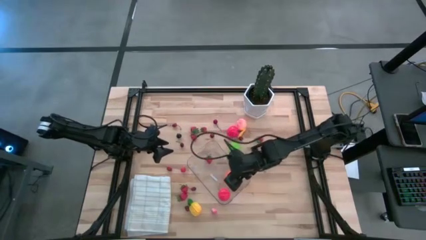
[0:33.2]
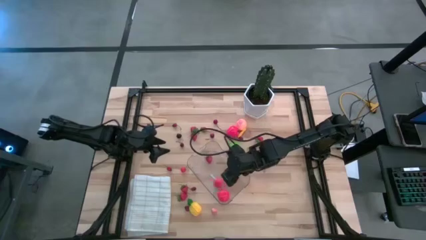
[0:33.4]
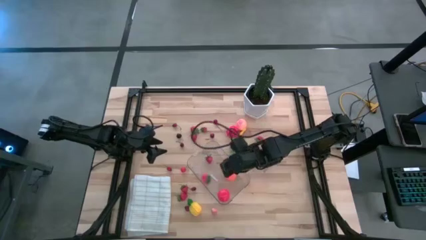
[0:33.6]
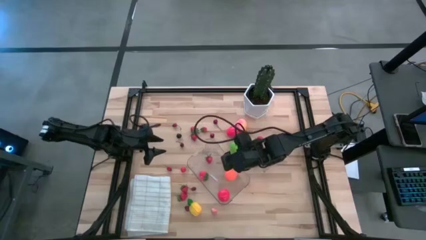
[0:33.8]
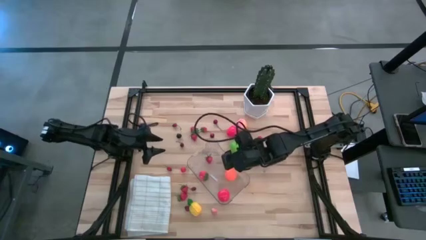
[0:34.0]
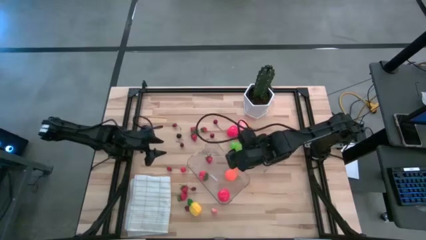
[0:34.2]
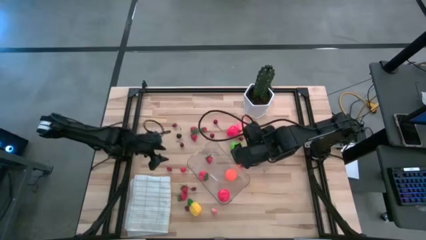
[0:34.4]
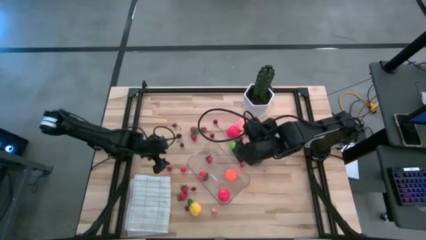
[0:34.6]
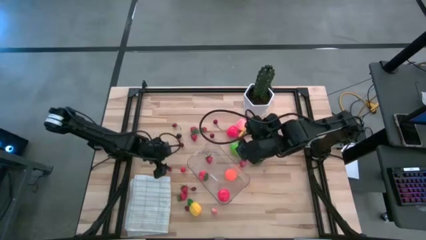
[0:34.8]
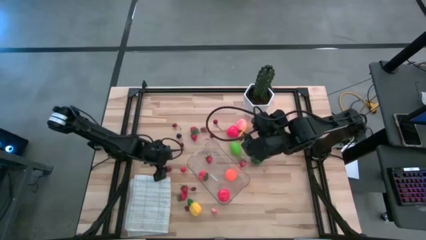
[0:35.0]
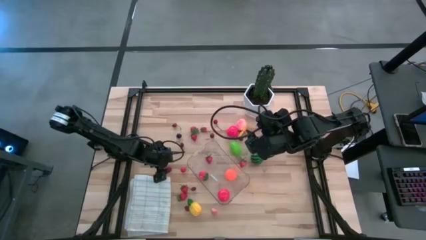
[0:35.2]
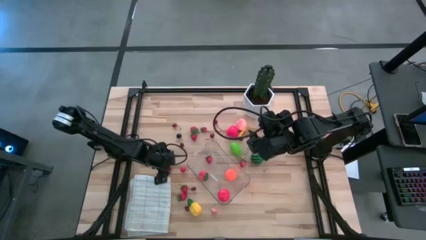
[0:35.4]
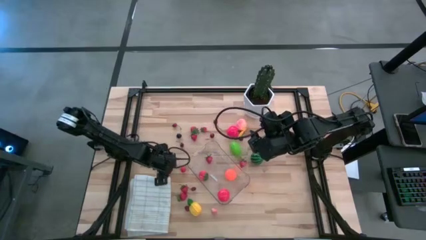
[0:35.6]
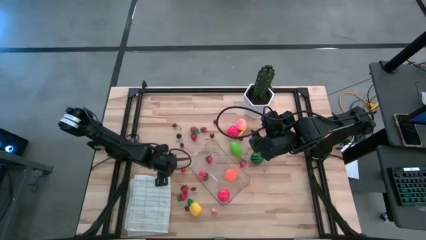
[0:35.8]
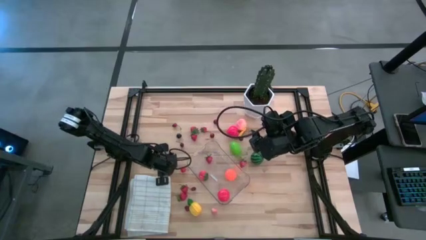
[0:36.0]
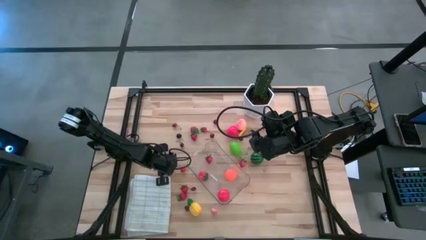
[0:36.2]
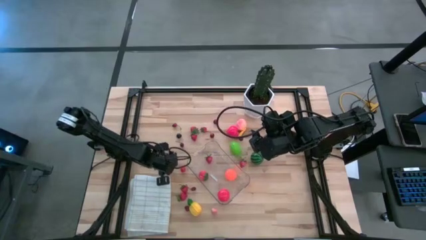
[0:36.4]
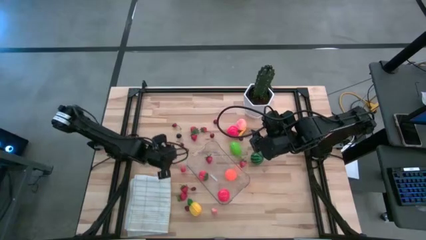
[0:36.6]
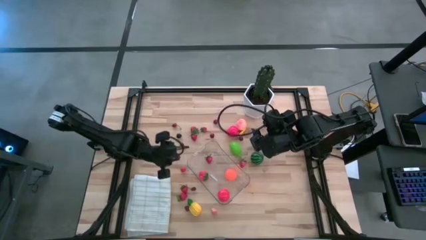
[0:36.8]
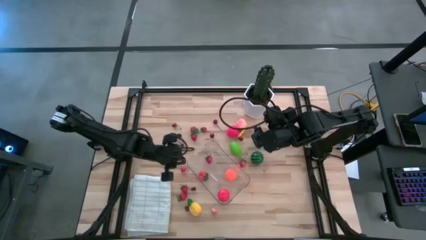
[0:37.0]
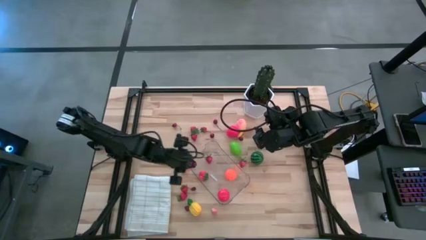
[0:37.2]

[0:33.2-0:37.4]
Task: Pick and placing Produce into tupperware
Put the red cherry into the transparent bin

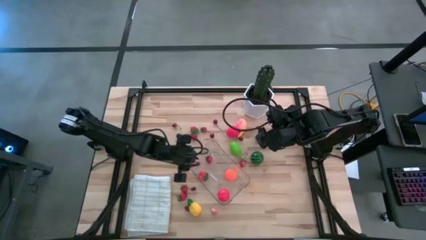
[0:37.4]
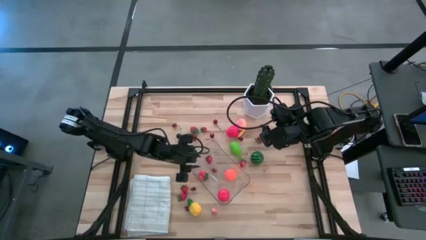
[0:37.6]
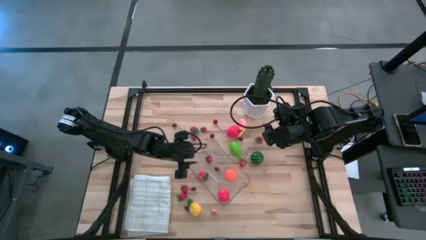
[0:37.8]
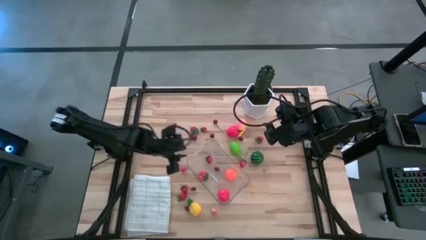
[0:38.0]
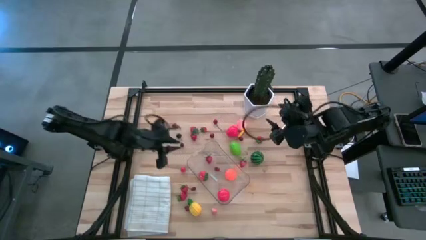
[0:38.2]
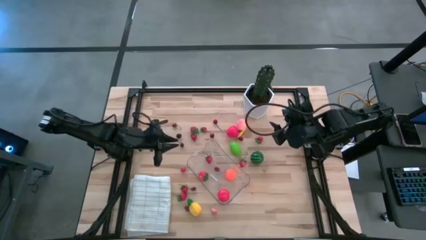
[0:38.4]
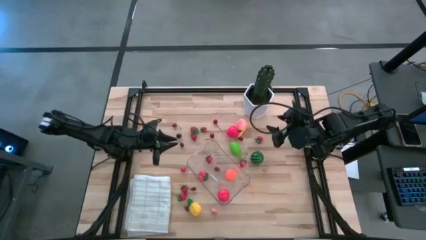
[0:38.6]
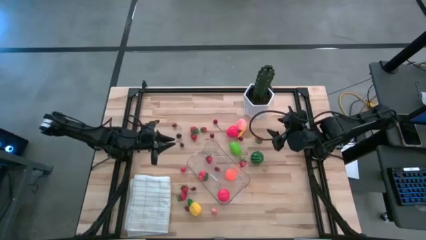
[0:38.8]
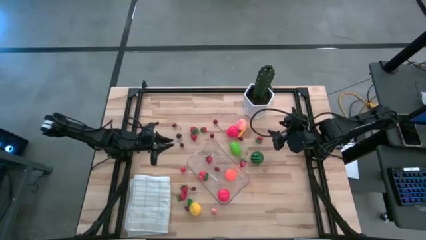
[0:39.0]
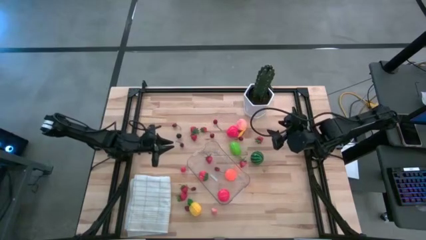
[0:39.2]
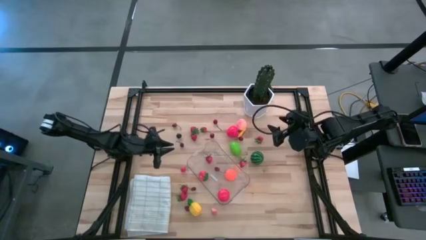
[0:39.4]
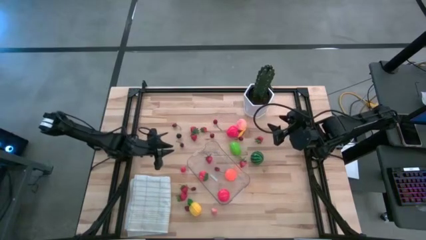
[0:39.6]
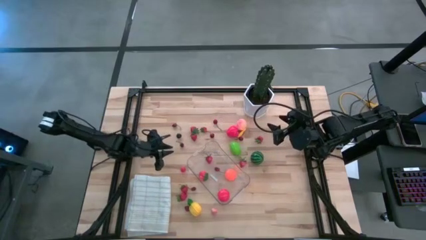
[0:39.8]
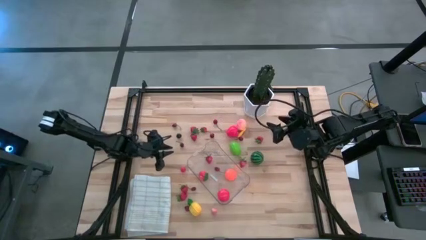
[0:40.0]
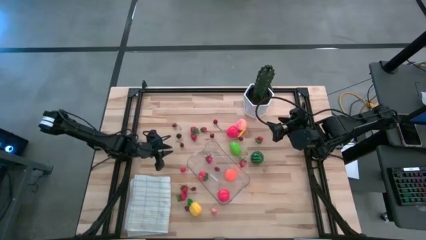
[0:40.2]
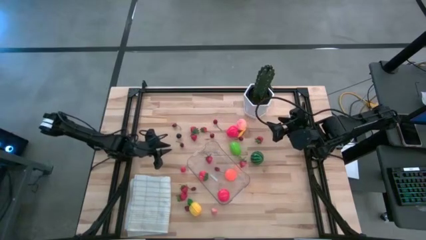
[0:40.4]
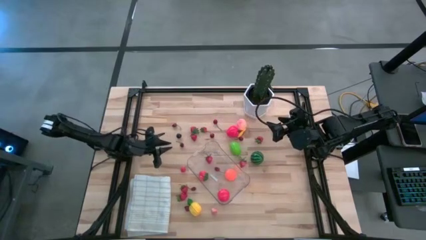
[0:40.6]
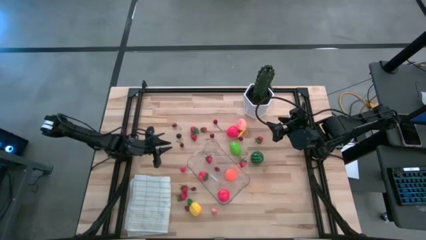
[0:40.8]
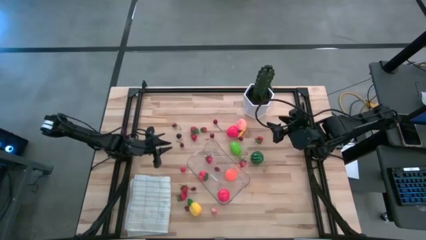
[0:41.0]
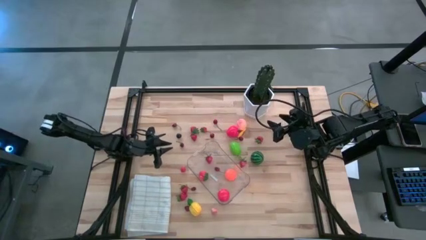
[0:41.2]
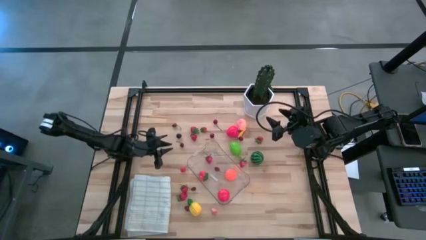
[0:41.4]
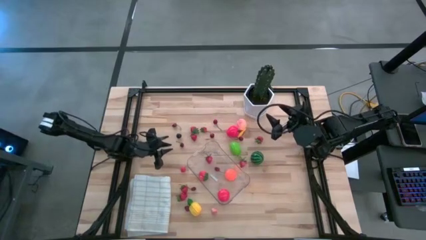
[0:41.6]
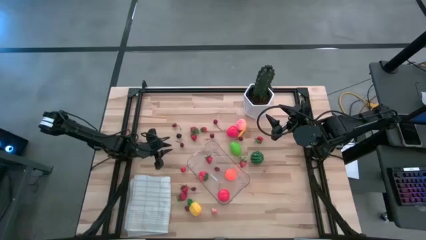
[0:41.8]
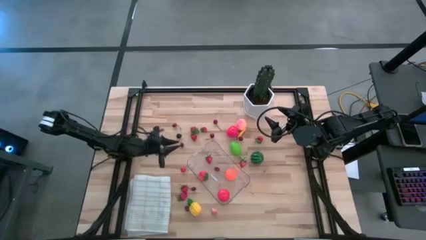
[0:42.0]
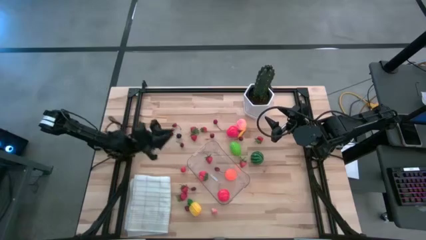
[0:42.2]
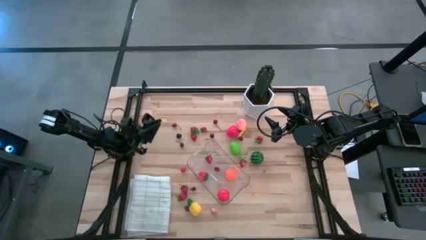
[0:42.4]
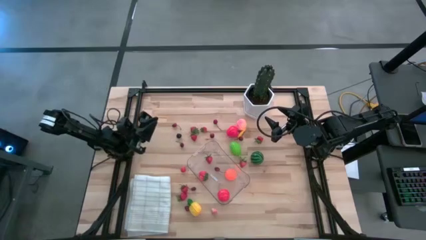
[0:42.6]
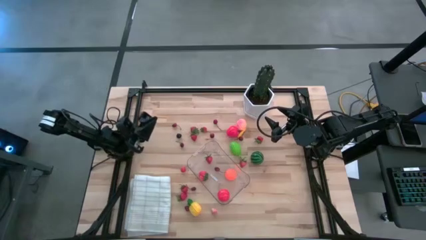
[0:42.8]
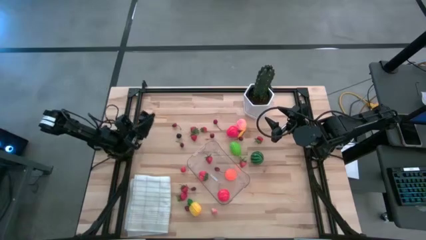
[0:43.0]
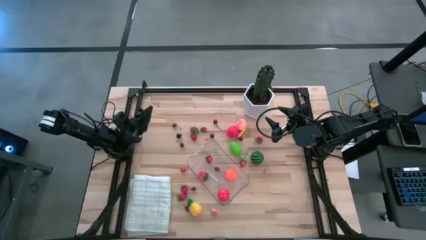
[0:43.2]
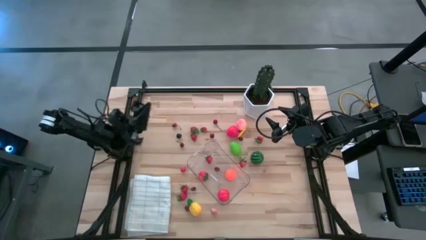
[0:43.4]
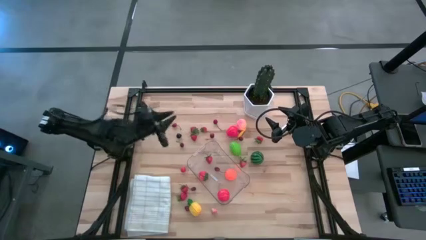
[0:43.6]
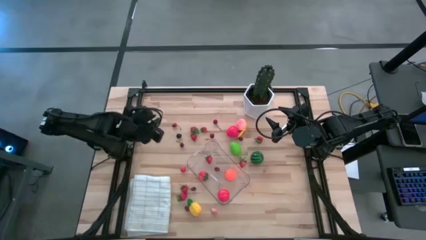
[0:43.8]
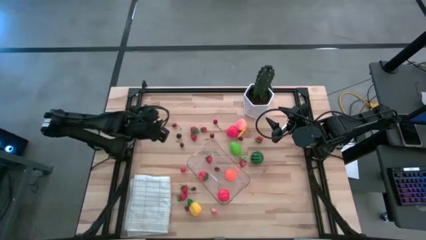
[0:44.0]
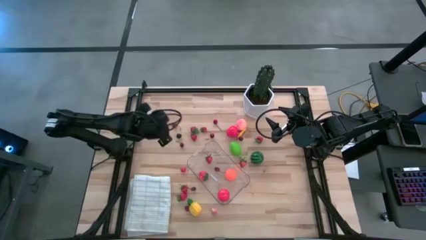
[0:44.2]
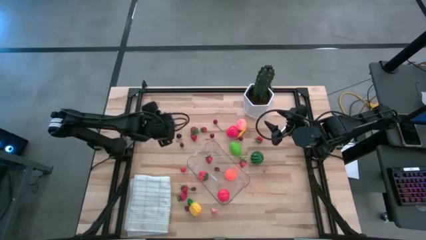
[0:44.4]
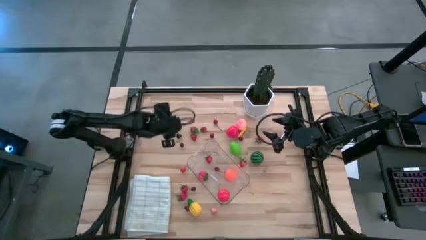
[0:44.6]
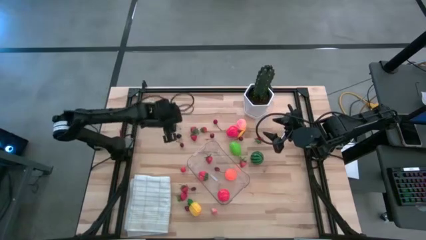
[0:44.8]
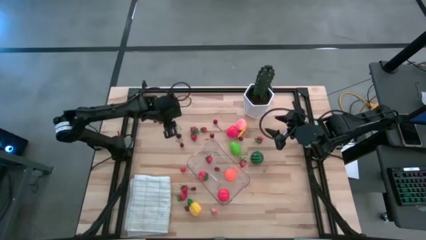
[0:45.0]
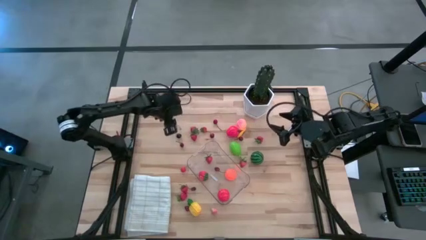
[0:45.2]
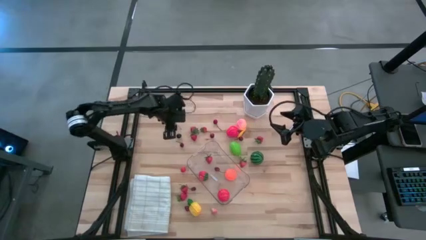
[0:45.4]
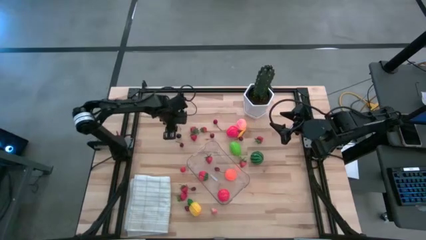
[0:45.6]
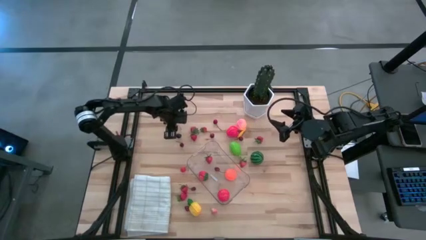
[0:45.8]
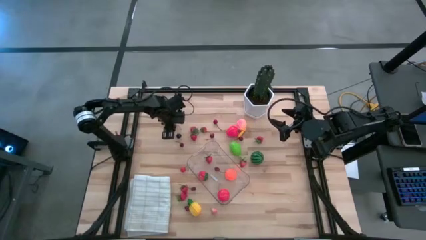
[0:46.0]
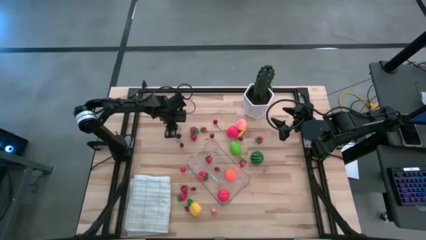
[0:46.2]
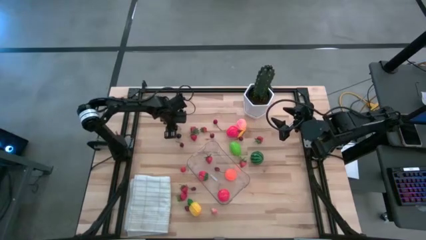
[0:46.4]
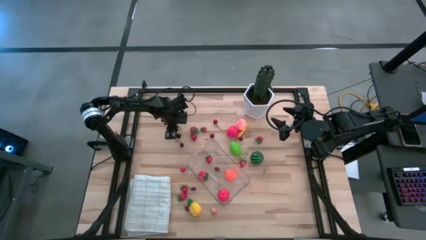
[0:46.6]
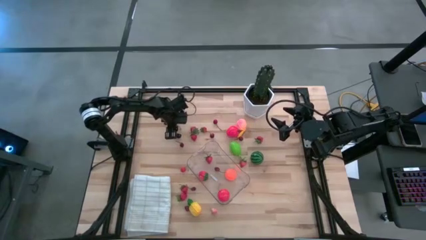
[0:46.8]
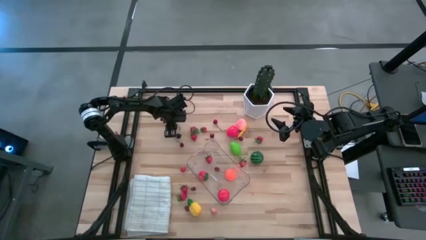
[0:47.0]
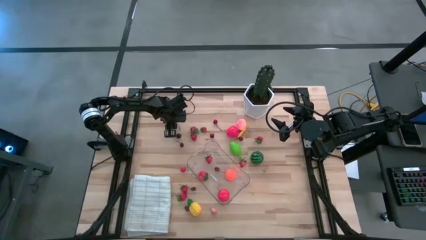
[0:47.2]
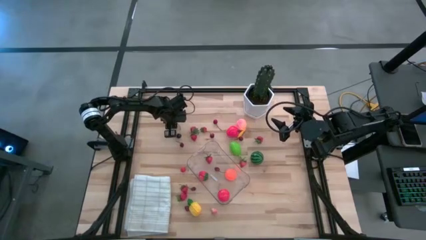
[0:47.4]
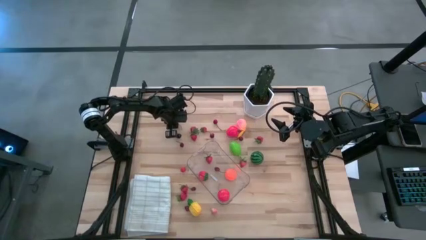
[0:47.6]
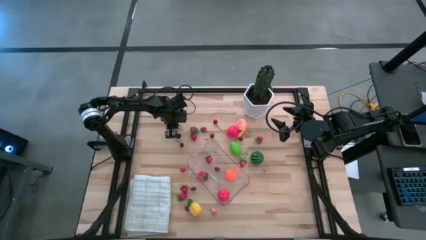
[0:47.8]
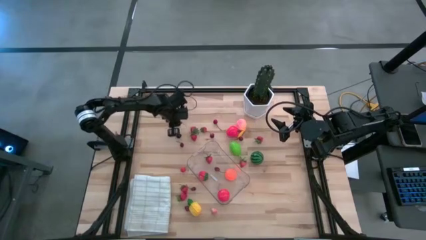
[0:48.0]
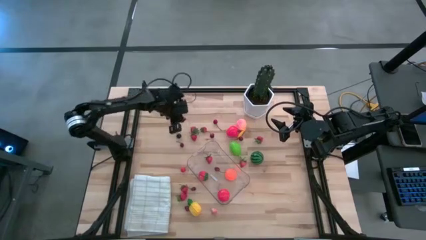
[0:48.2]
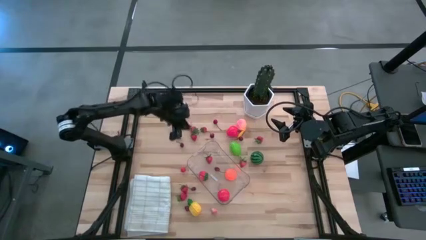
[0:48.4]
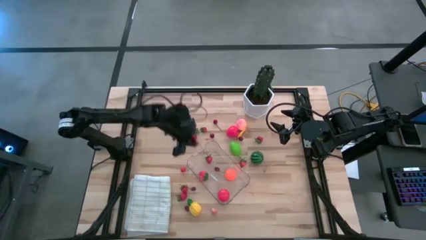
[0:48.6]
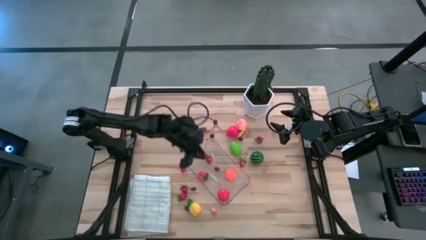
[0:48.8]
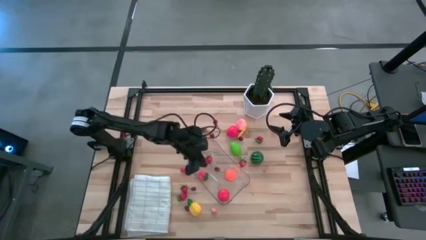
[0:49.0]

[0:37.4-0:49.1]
Put the red cherry into the transparent bin
